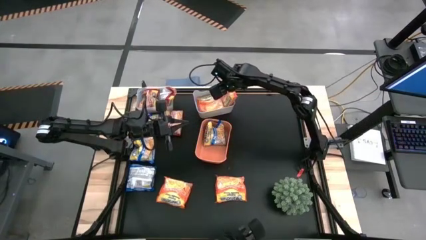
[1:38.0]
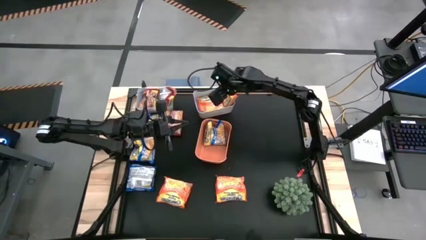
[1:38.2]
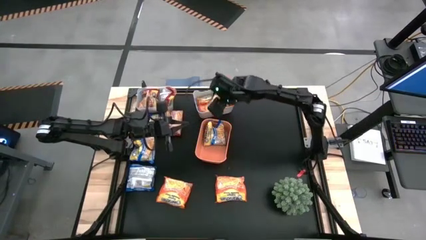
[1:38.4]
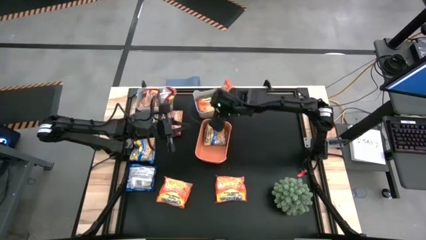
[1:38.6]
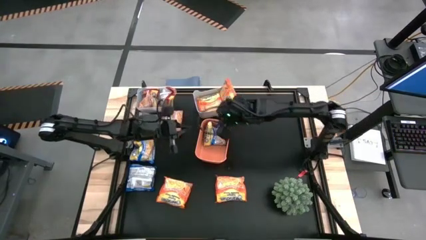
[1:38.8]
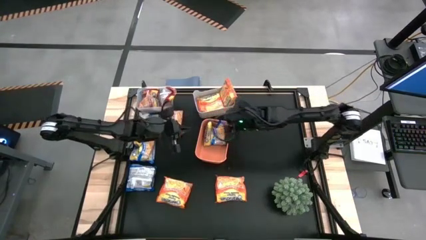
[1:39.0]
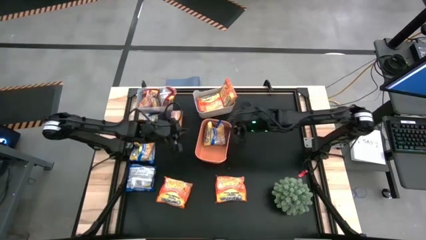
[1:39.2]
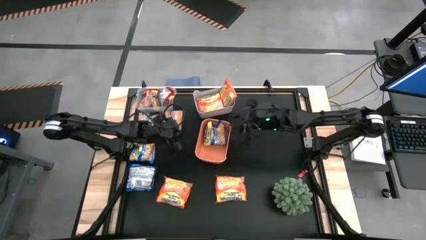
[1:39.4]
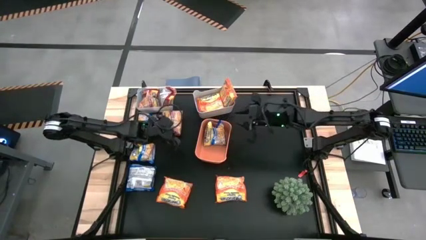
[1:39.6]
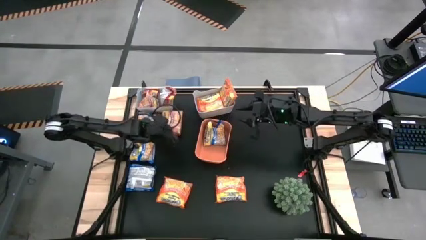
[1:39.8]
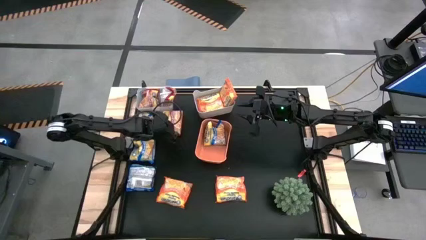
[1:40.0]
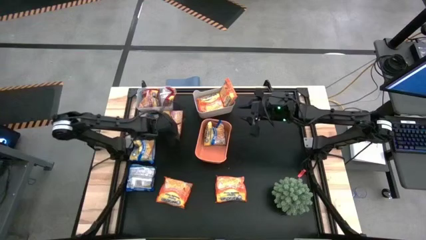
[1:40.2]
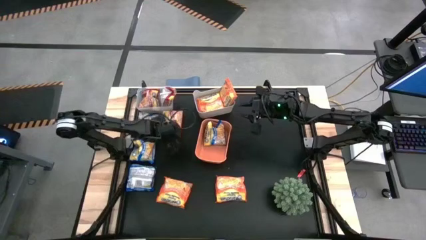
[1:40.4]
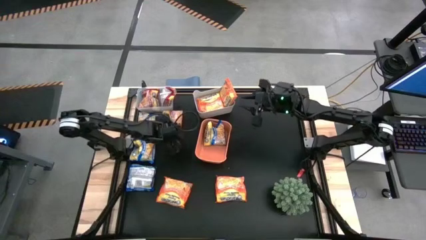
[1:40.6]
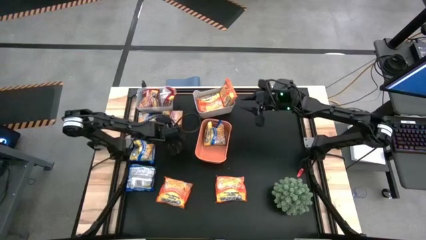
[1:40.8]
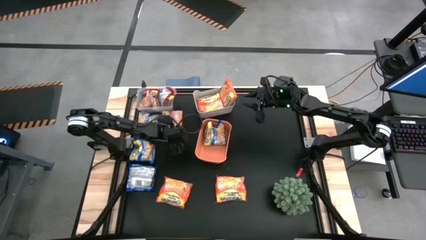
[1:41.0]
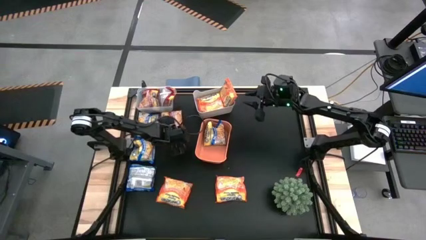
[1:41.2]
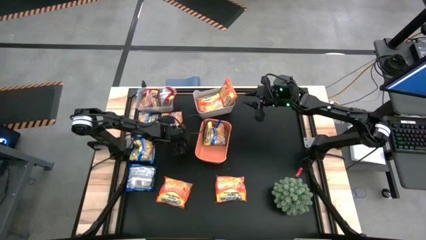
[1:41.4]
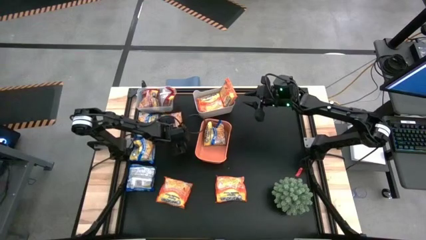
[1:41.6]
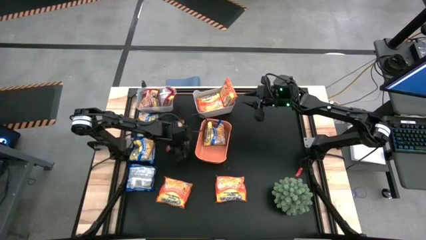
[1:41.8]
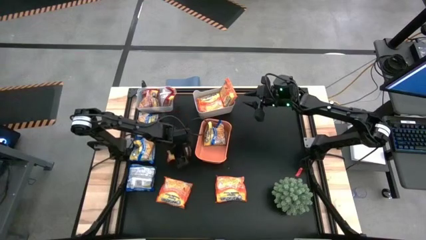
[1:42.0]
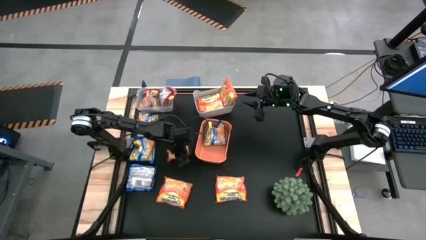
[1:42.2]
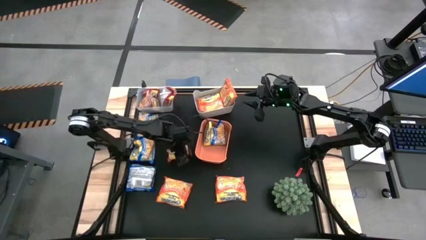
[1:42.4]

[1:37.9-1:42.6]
Task: Sort Maruchan noodles
Put the red bag into the transparent bin

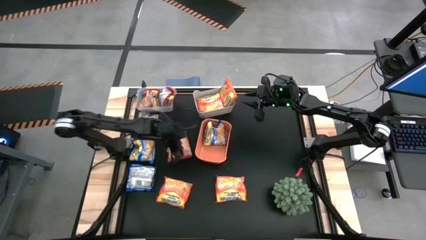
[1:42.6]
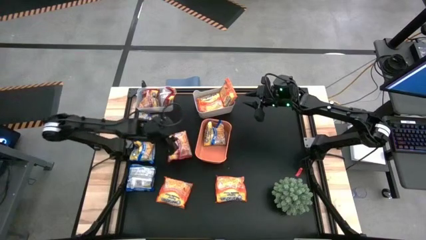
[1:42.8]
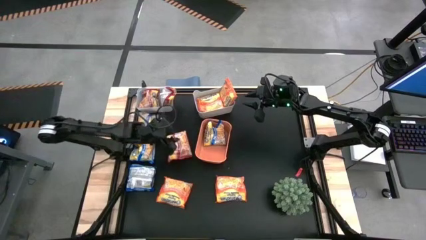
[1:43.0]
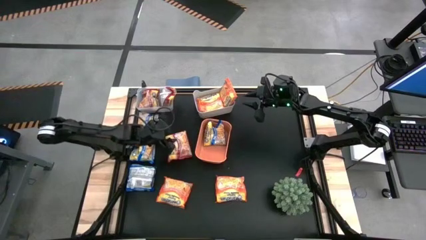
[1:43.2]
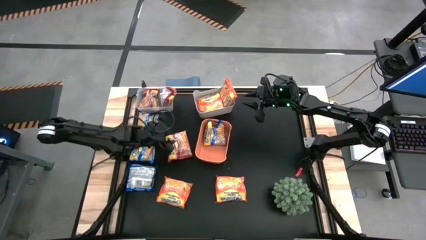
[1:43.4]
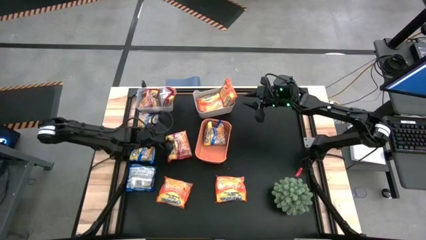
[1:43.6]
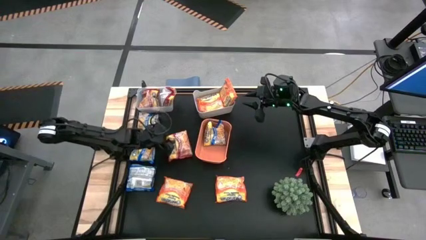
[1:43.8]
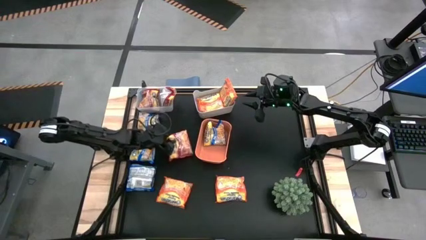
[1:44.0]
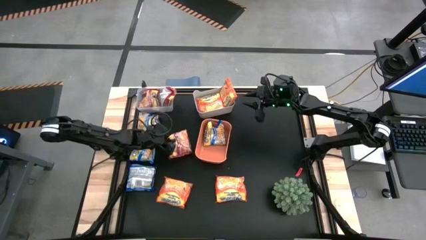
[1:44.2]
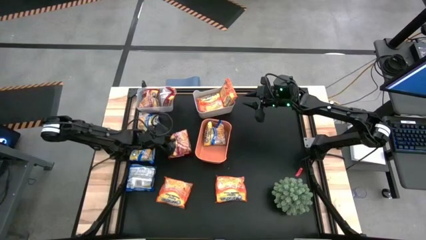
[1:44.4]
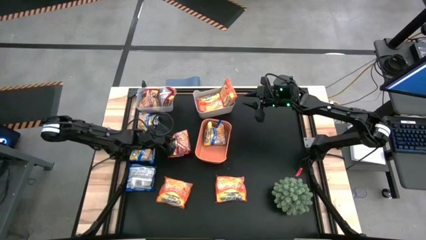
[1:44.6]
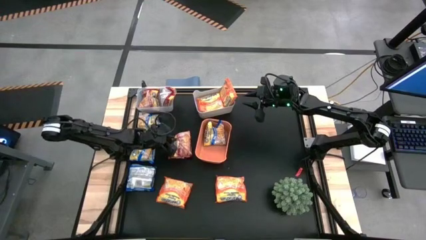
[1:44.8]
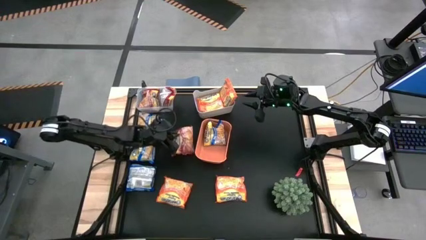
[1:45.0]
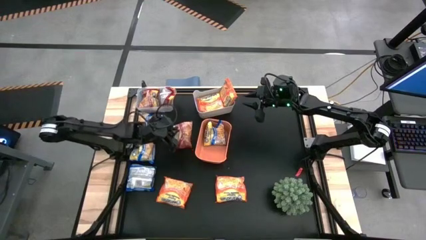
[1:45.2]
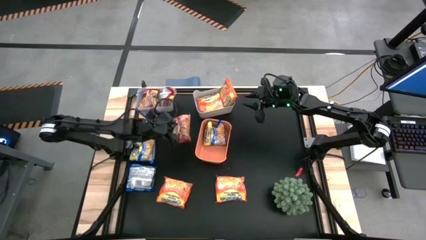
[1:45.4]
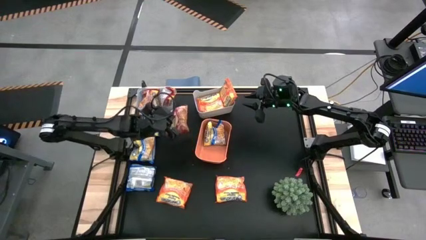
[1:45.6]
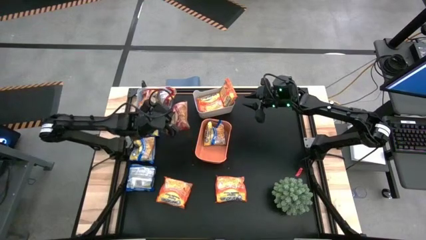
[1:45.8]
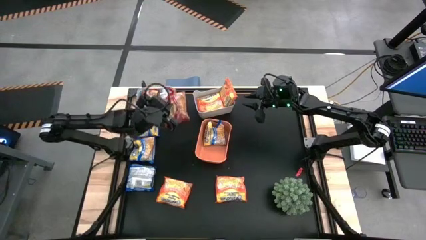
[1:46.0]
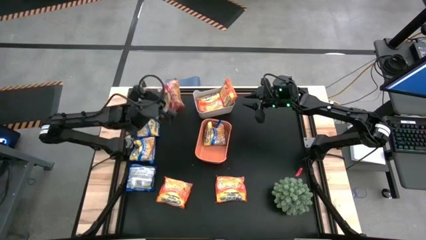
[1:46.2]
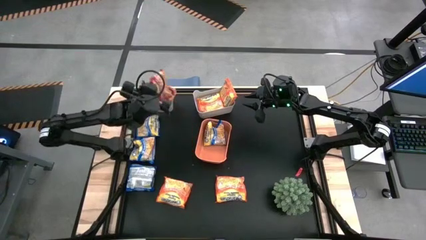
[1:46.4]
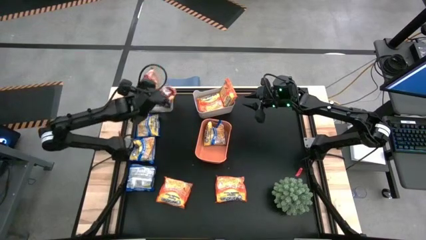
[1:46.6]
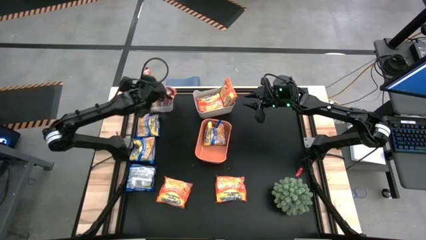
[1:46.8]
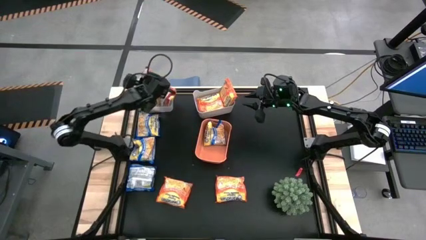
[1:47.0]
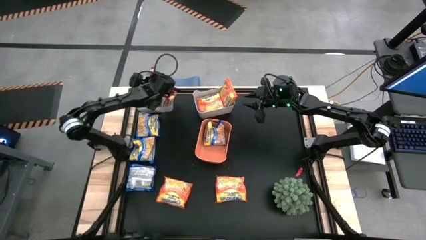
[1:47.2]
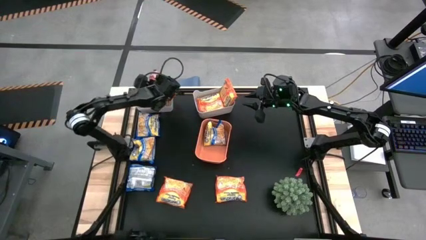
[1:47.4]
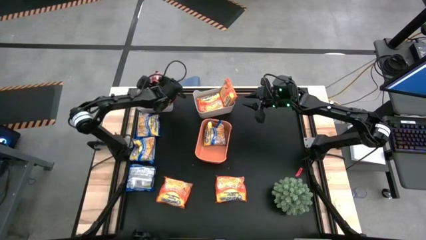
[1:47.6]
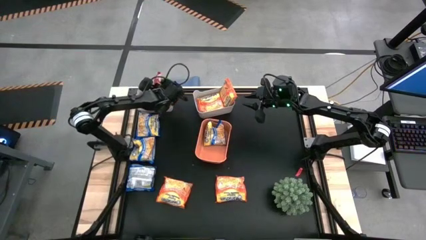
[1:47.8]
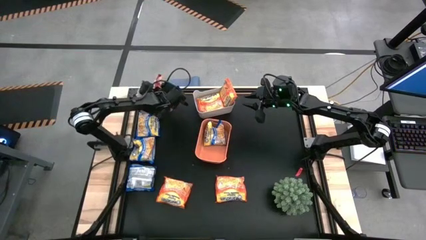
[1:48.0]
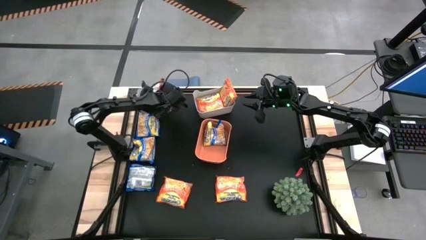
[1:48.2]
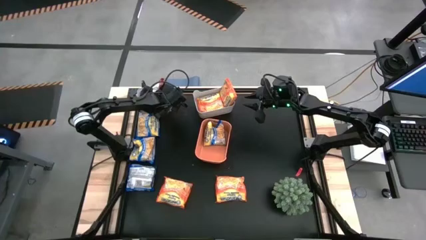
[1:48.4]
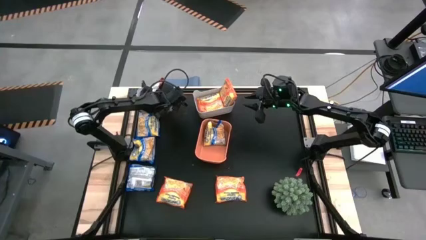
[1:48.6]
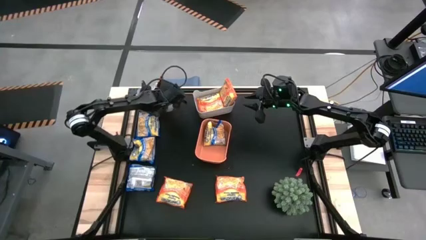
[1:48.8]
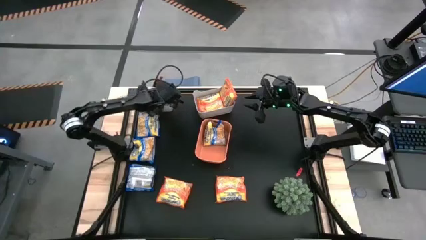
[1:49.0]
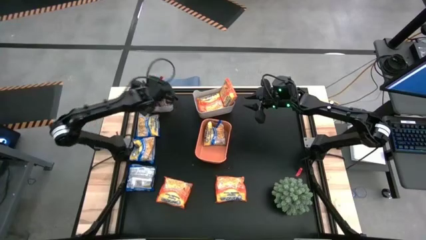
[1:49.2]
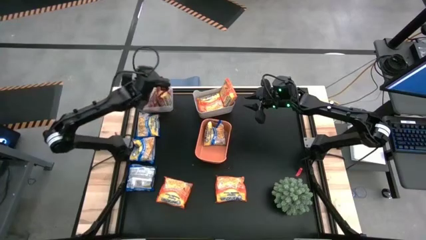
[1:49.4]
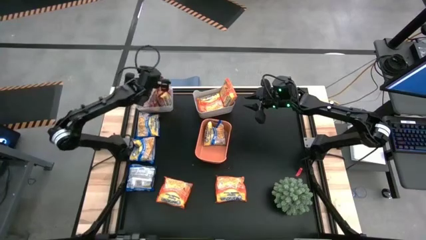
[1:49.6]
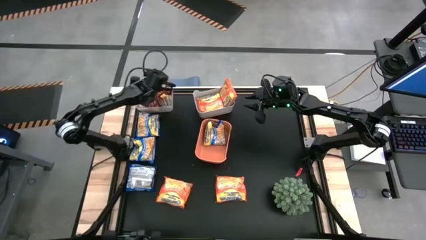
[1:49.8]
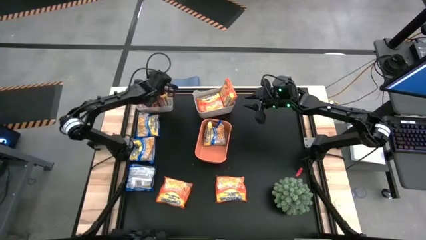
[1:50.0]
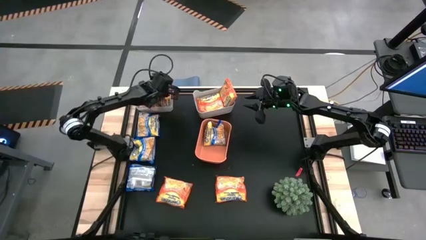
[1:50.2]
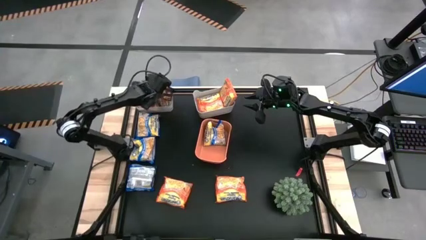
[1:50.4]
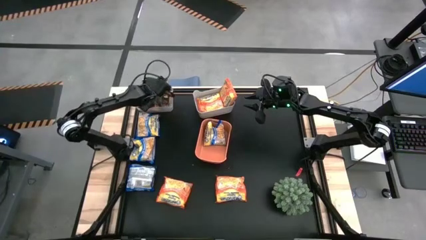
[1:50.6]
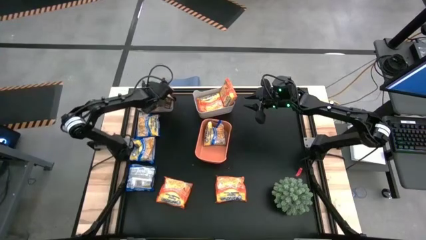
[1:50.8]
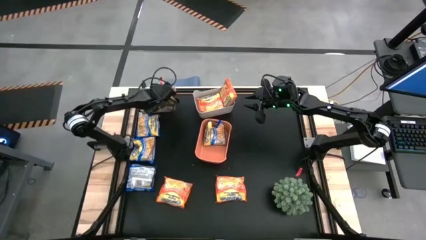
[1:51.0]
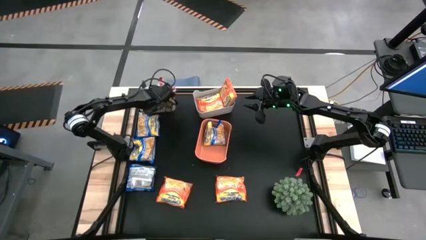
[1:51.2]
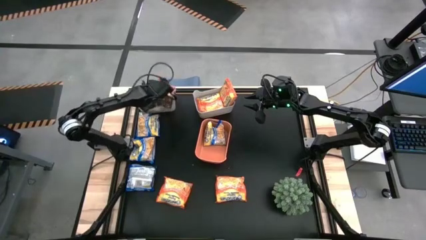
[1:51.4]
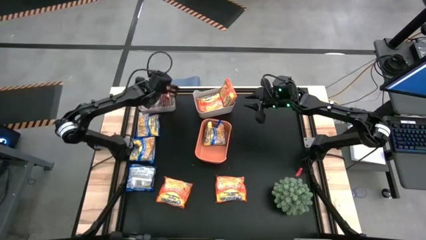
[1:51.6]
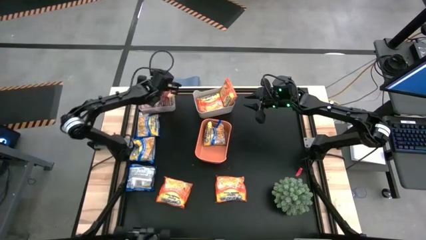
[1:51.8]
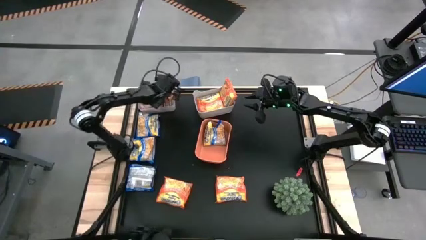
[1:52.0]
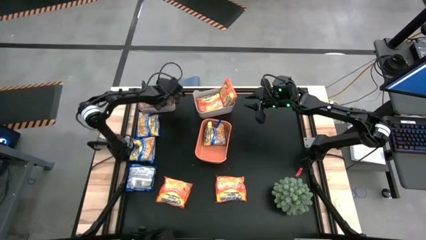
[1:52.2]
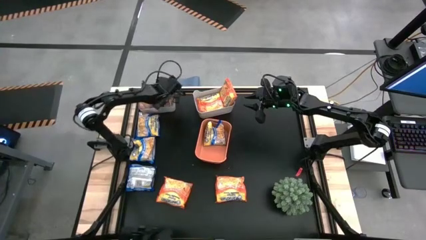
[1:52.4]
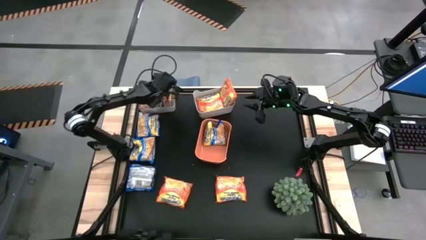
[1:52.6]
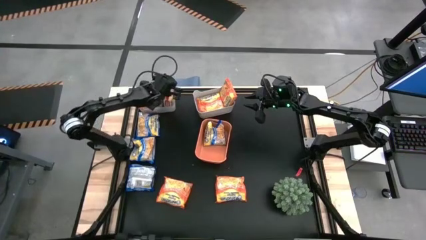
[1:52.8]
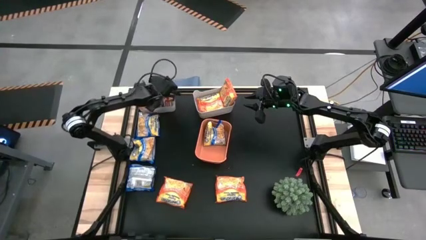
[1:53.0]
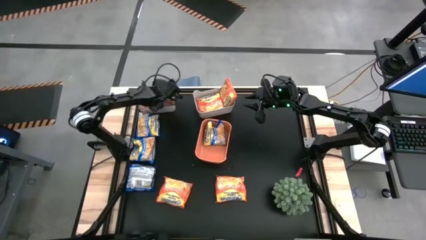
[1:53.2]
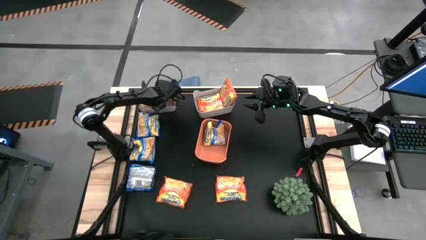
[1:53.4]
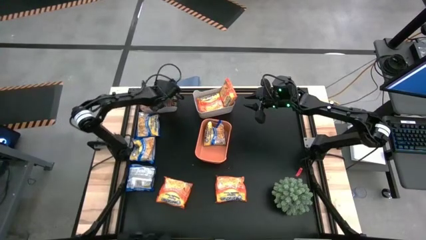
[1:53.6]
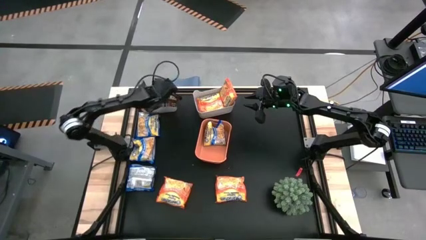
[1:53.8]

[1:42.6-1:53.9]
Put the red bag into the transparent bin
